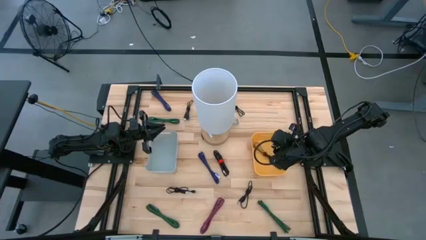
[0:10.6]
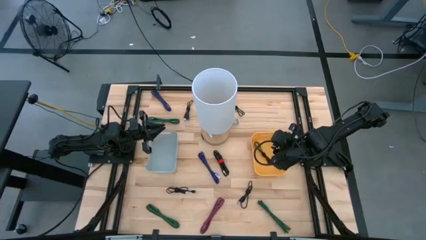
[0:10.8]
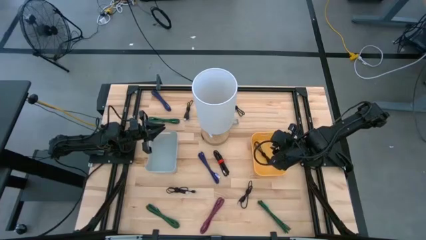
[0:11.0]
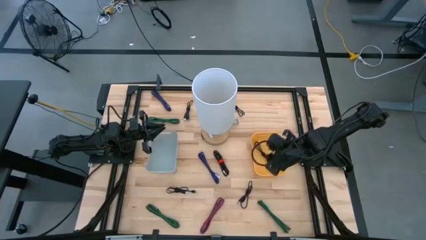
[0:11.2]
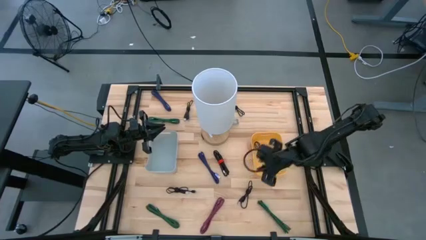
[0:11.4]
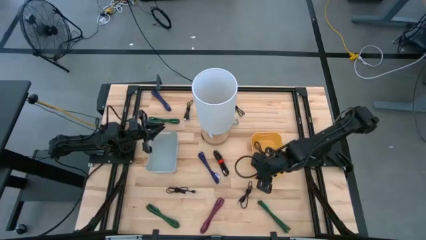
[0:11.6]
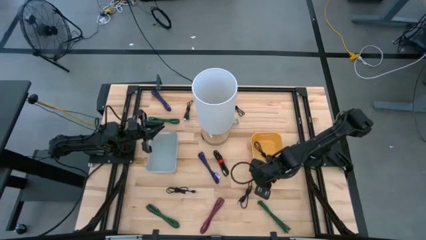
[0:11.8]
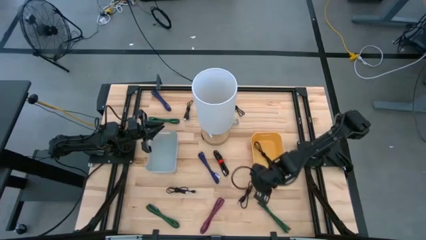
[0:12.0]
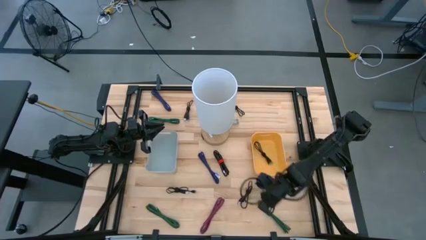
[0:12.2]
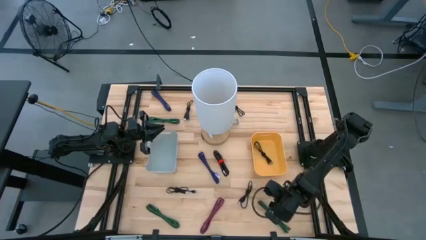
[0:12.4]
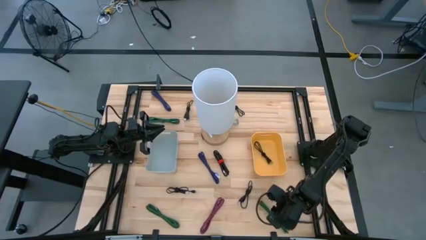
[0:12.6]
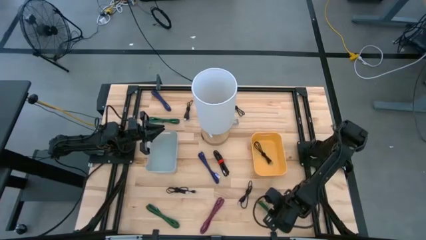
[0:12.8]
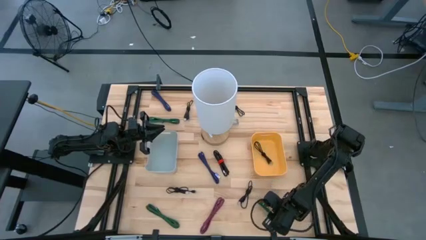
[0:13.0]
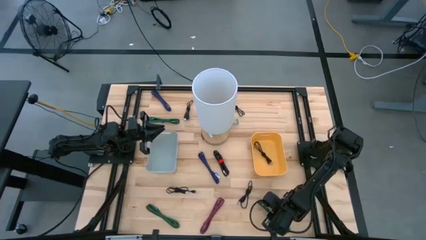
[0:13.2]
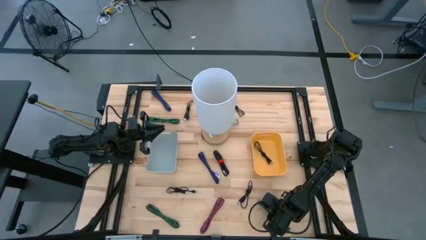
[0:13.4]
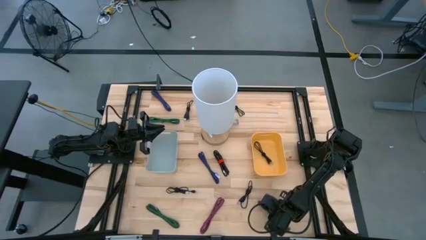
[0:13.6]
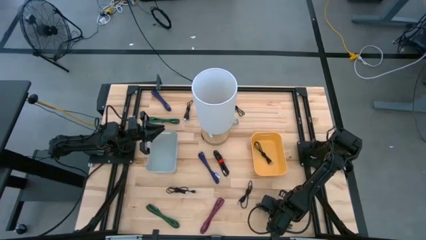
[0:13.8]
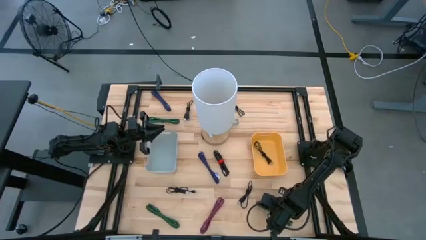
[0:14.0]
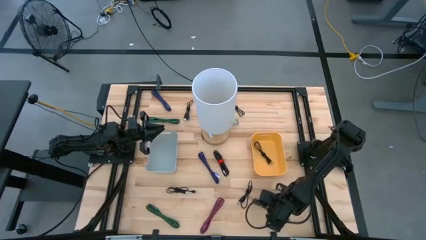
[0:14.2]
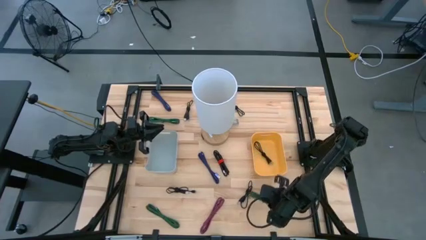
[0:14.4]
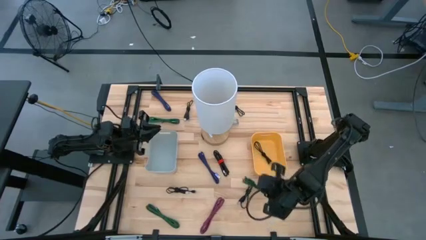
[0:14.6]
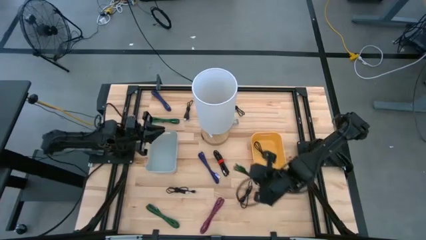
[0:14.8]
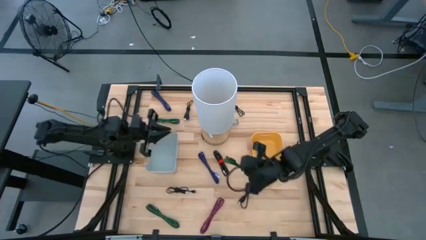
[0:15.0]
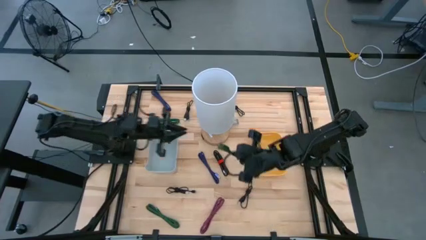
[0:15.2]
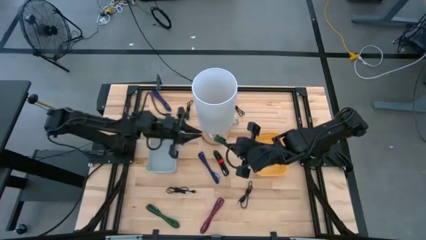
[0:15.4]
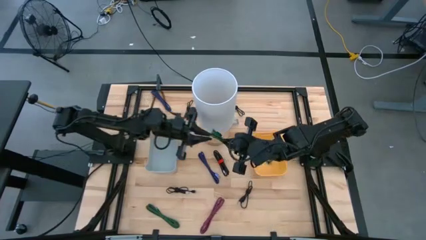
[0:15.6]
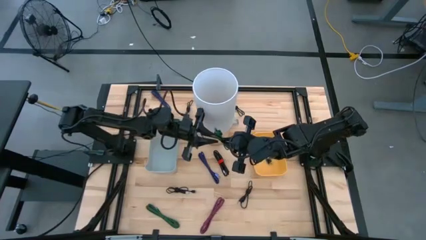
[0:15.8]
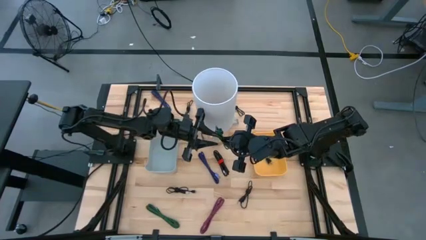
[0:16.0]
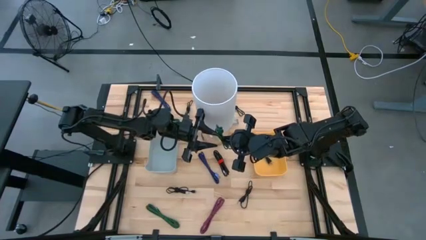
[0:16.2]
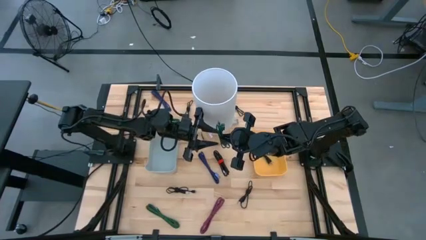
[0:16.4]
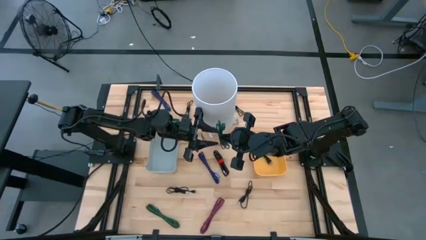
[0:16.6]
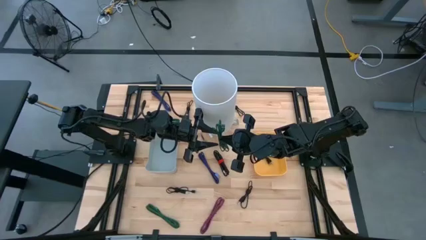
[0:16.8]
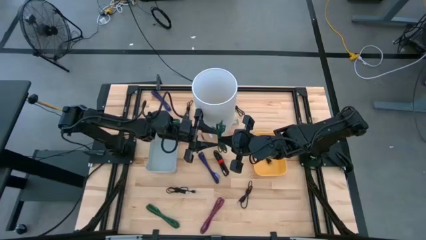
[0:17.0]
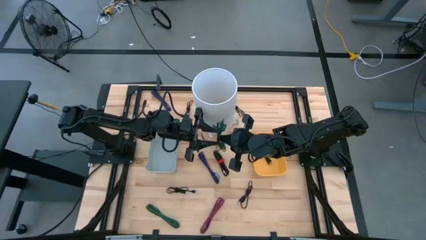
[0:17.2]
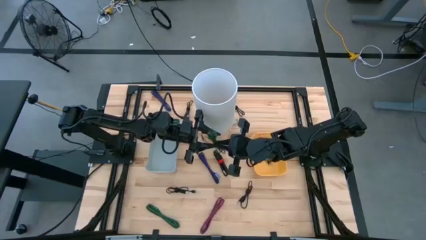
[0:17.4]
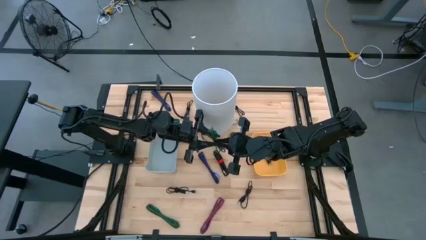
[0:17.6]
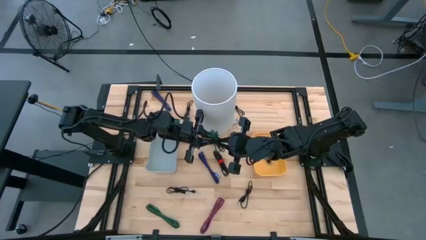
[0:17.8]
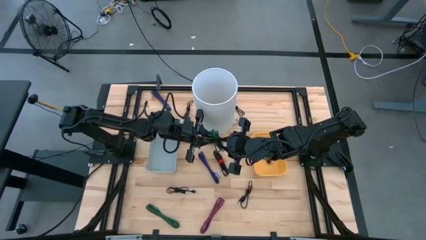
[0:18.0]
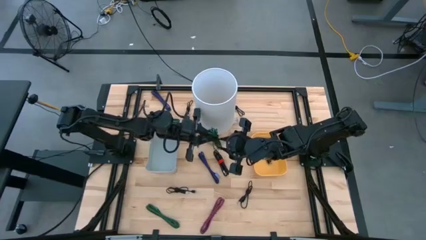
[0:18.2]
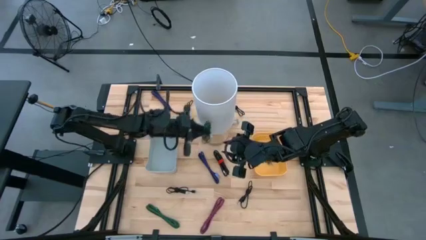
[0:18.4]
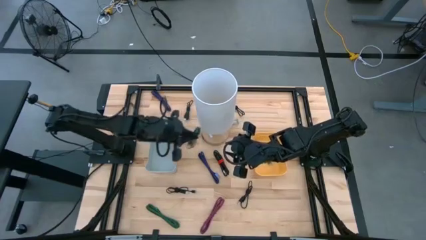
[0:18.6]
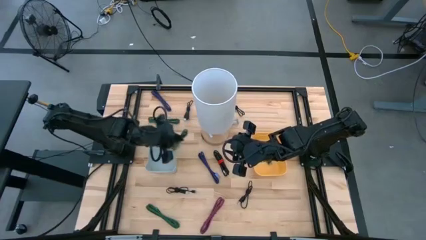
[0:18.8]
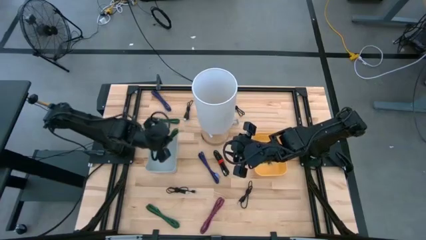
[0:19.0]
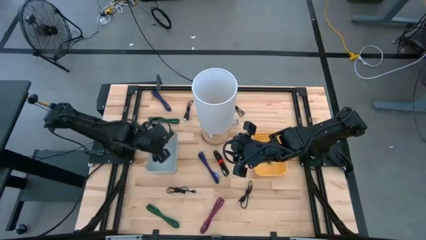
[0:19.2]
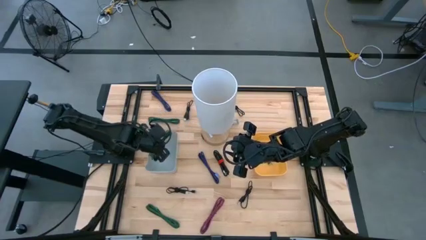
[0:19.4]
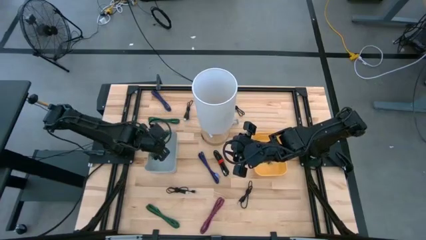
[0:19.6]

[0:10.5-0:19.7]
Task: Pick & Place USB Port
Put the right green patterned USB charger into the gray bin

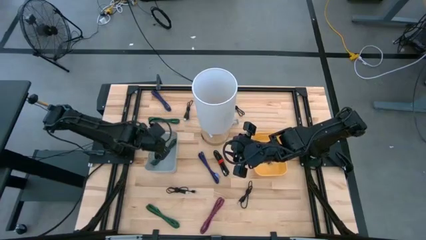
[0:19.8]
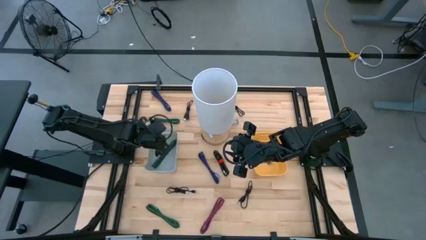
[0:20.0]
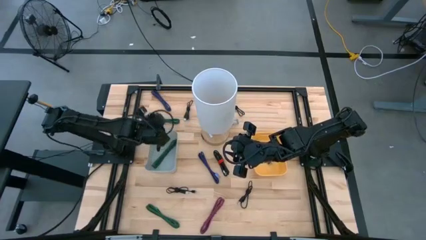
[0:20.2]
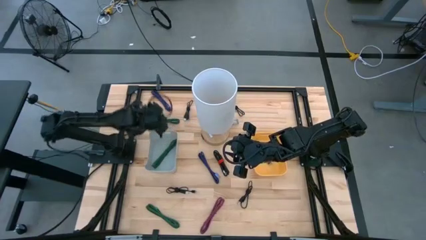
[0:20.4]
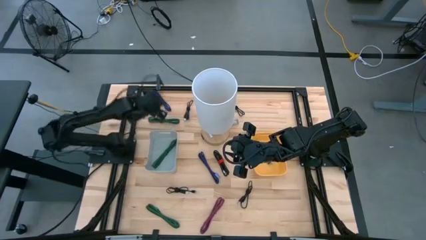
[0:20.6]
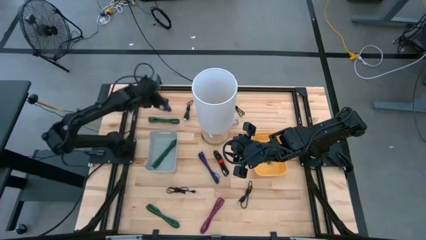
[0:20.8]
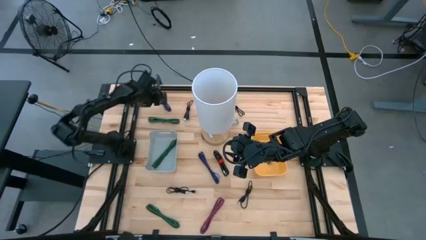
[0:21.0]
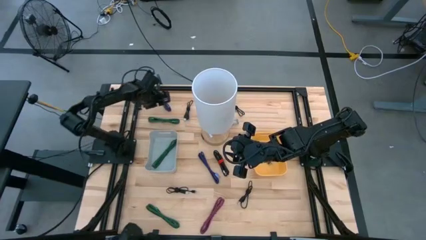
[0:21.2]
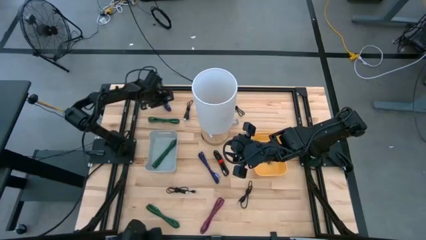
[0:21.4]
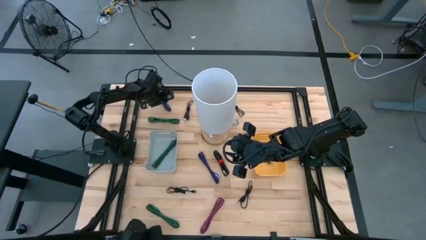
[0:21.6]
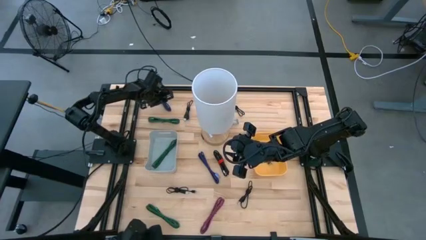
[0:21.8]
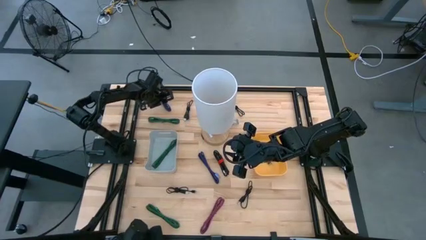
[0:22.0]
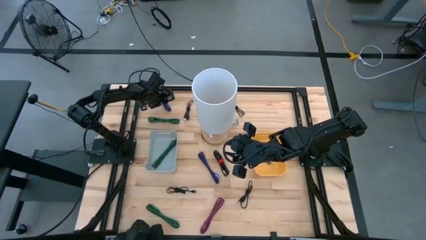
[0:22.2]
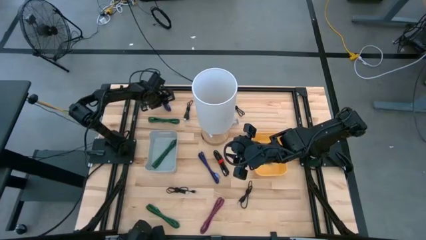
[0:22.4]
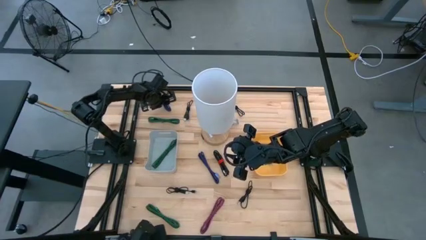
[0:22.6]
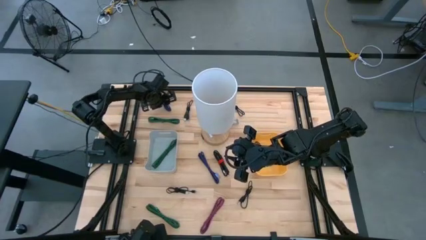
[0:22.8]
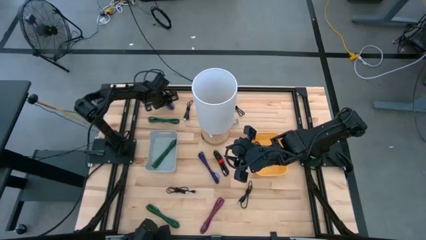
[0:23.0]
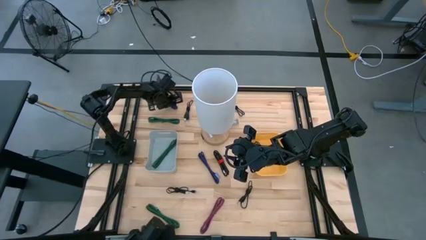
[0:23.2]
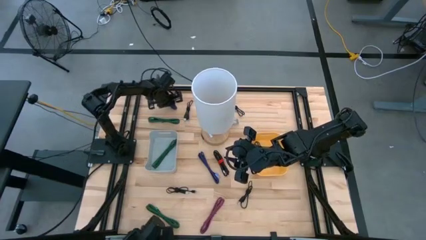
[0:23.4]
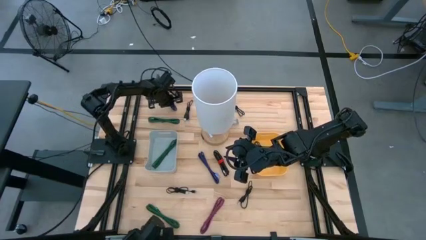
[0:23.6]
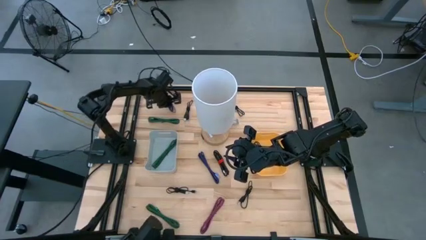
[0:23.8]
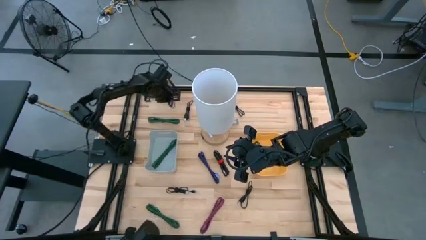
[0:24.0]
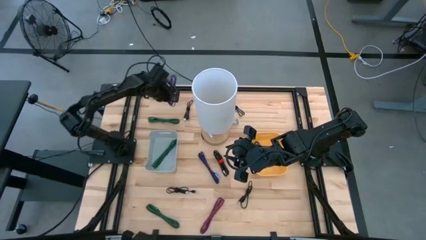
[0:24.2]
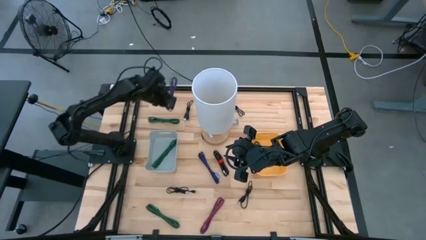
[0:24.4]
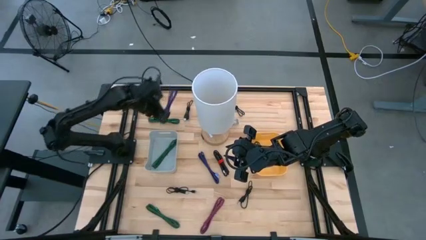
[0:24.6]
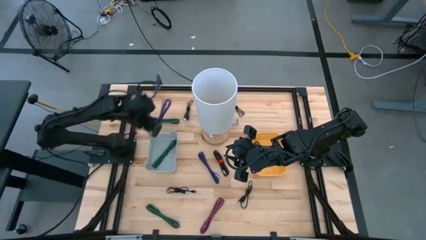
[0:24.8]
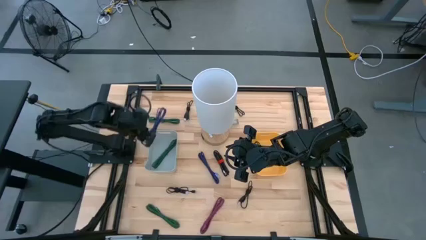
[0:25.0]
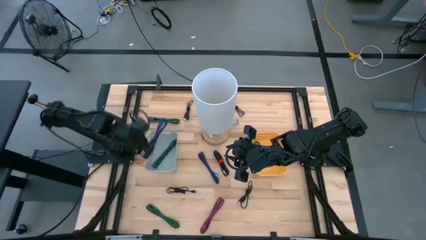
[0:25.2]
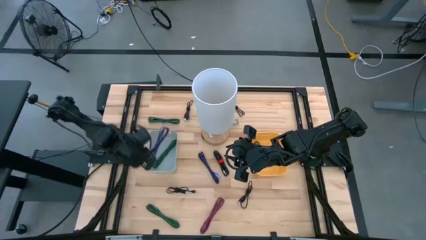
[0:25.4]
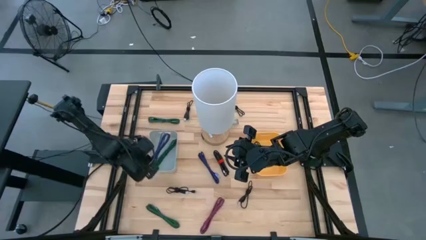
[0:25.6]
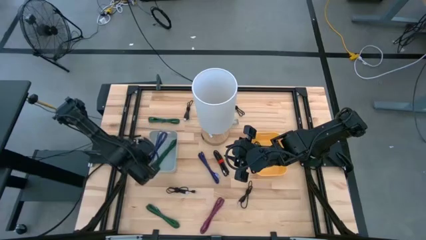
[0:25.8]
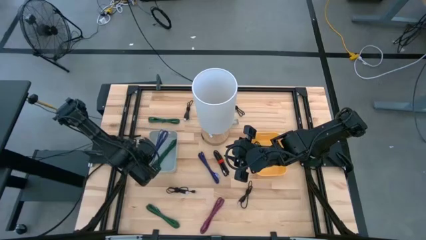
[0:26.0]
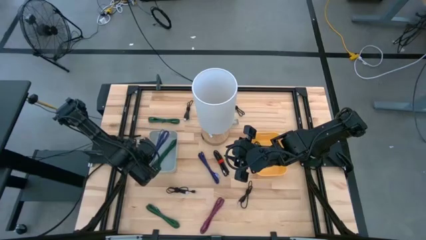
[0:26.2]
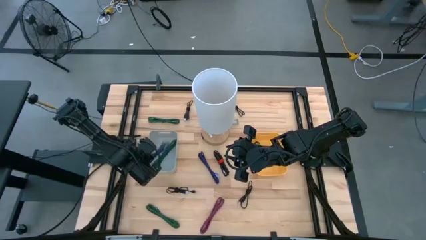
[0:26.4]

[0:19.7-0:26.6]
Put the top blue patterned USB charger into the gray bin

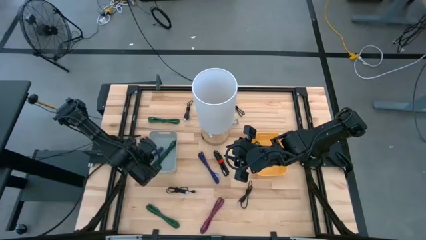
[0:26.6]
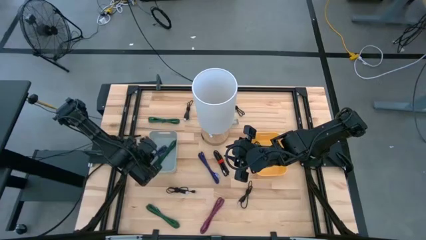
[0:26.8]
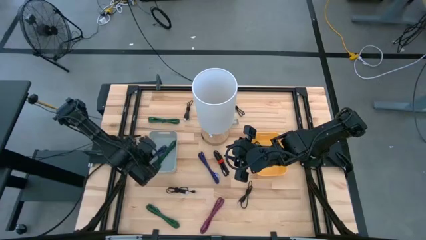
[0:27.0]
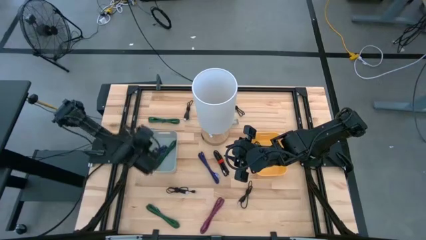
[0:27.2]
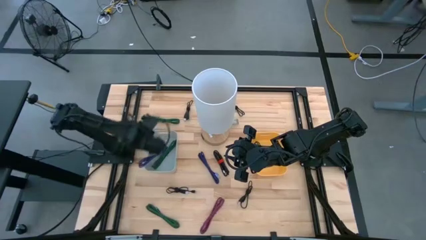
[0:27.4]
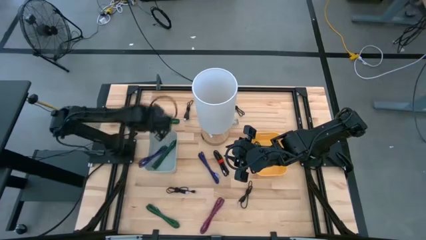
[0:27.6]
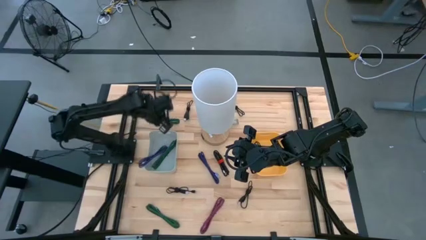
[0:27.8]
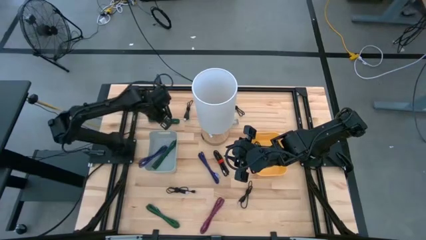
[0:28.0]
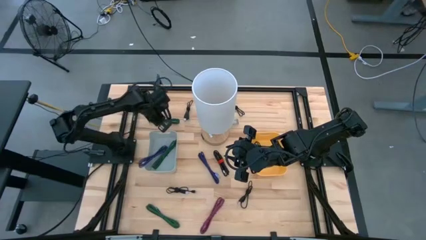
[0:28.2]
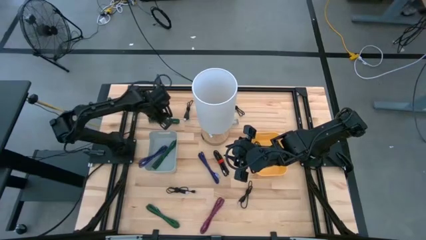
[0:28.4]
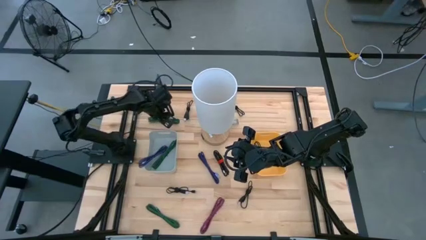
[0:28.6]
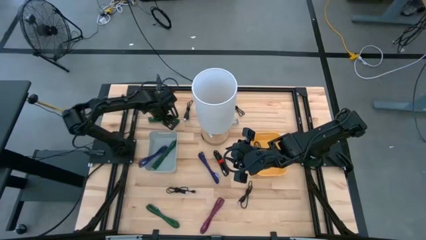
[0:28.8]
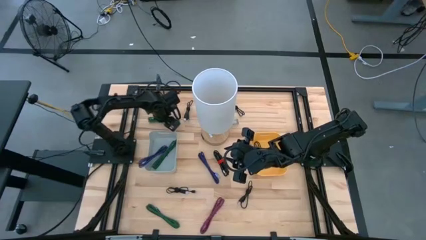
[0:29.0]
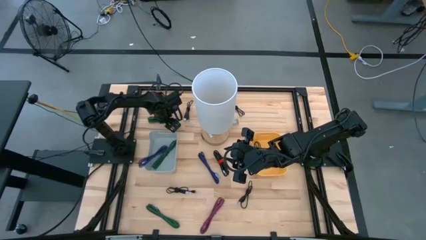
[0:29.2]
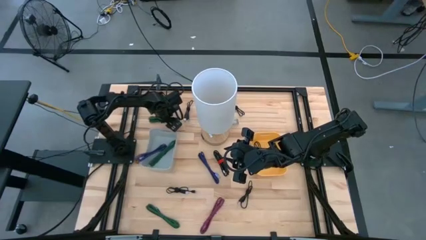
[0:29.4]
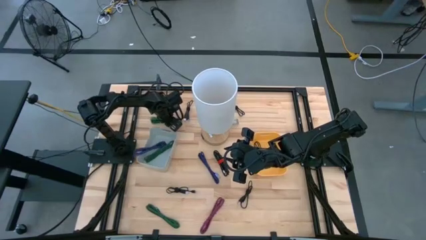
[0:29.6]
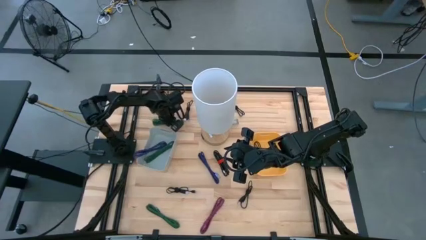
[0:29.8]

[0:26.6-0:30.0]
Put the top green patterned USB charger into the gray bin
